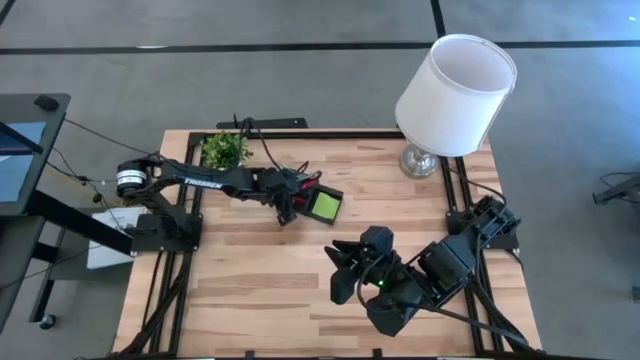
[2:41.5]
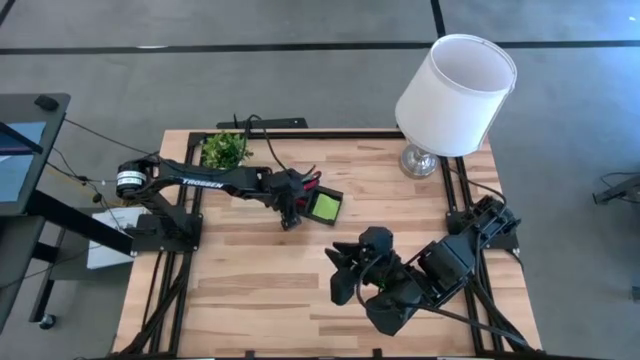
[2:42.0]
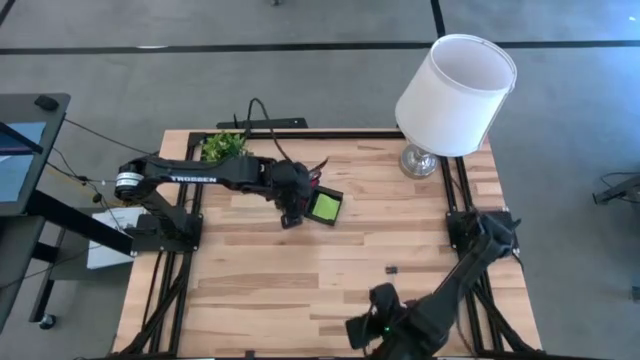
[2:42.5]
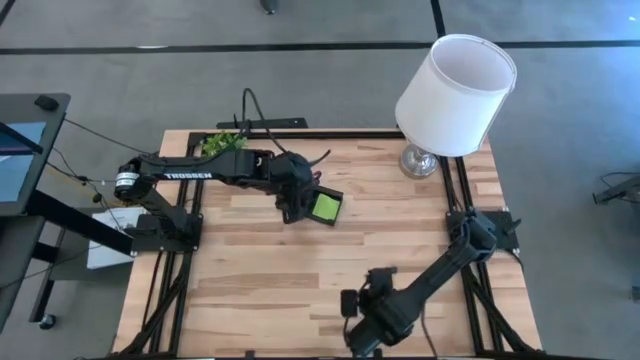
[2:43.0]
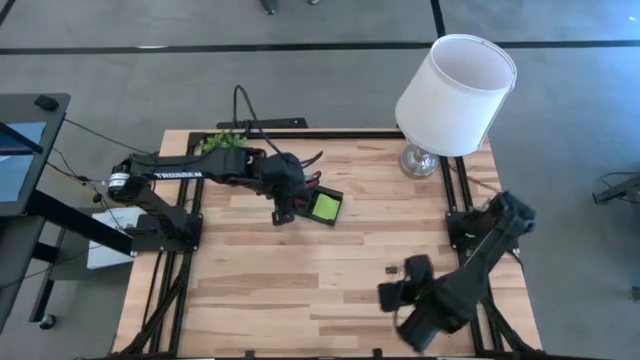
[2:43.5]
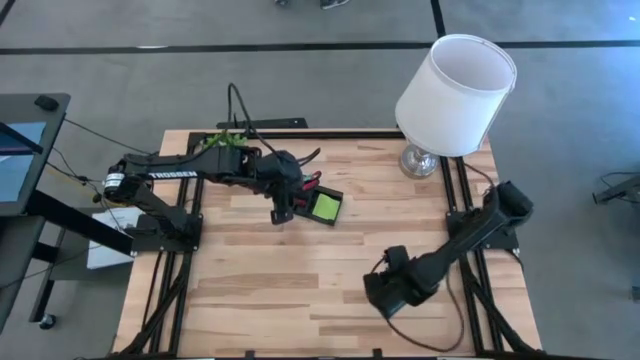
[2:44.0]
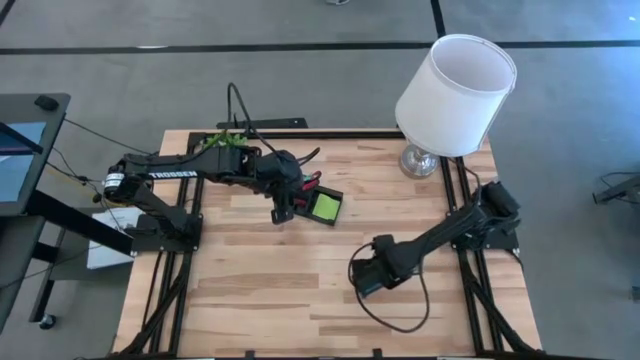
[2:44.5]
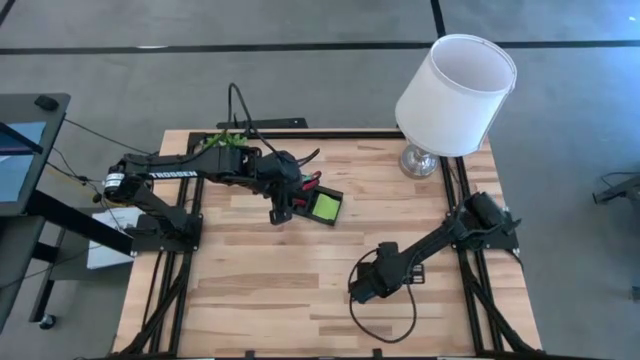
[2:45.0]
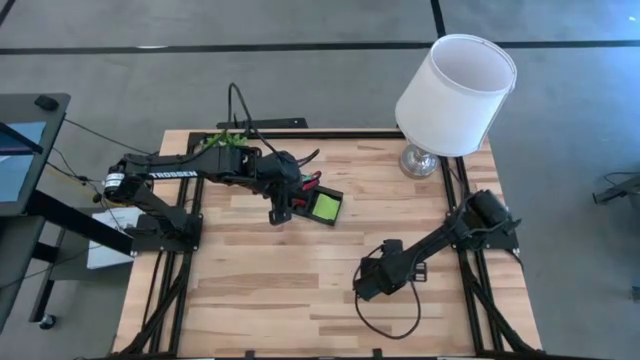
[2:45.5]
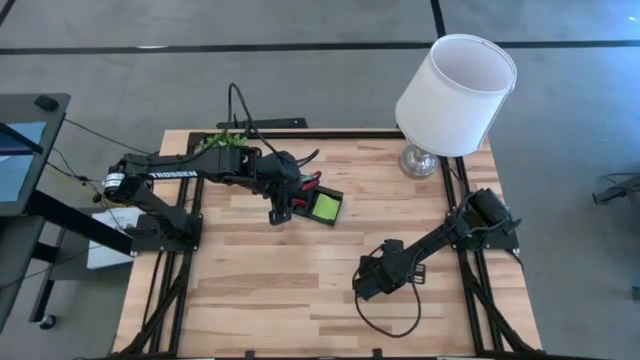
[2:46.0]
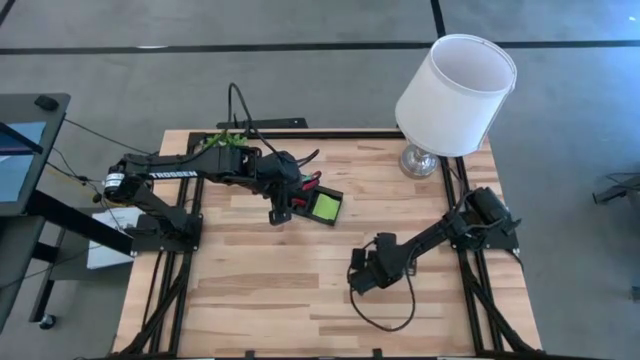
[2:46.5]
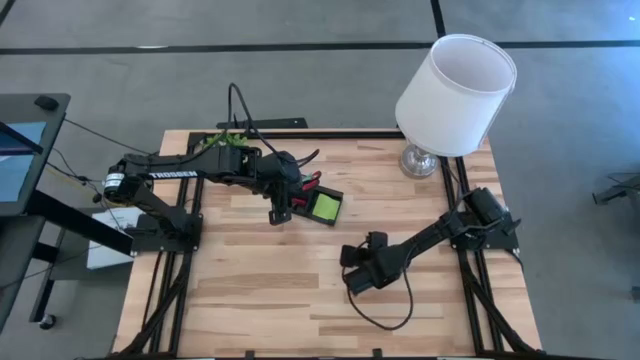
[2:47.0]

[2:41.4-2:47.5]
Task: Pick and place office supplies into organizer
Put the black binder clip into the black desk organizer

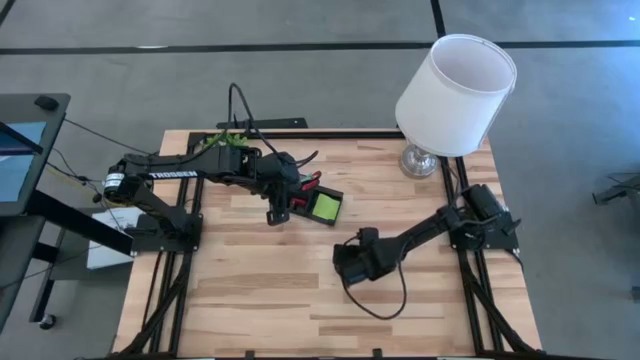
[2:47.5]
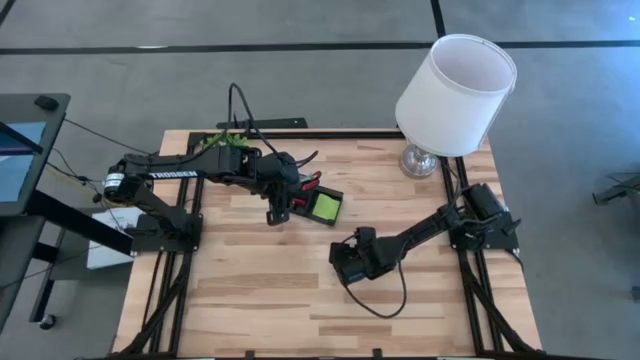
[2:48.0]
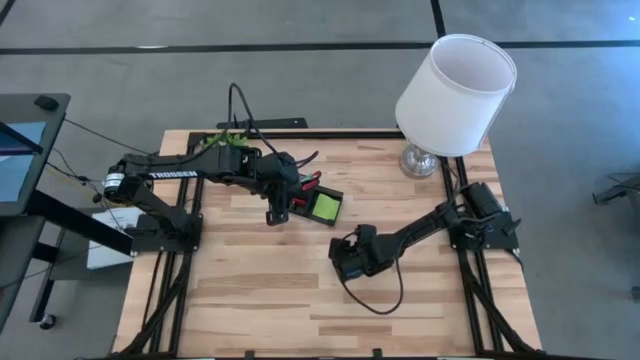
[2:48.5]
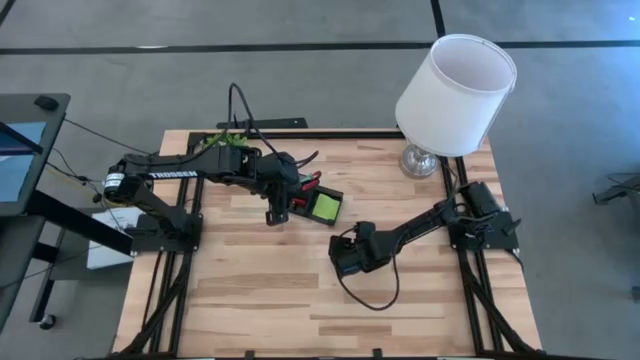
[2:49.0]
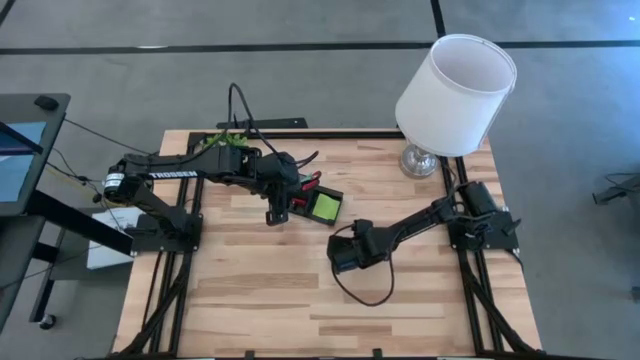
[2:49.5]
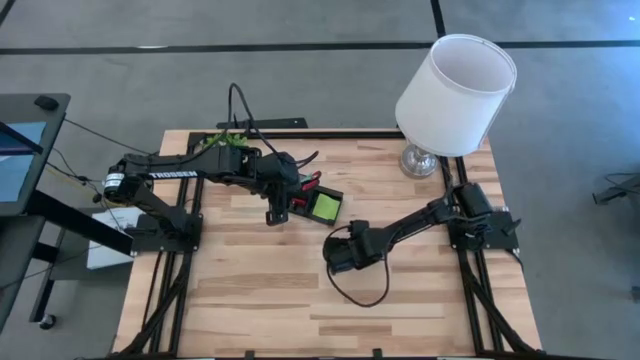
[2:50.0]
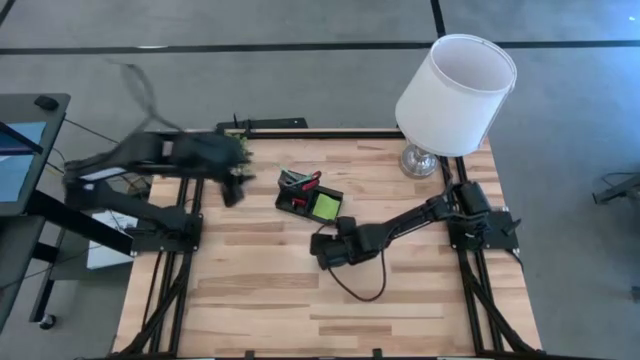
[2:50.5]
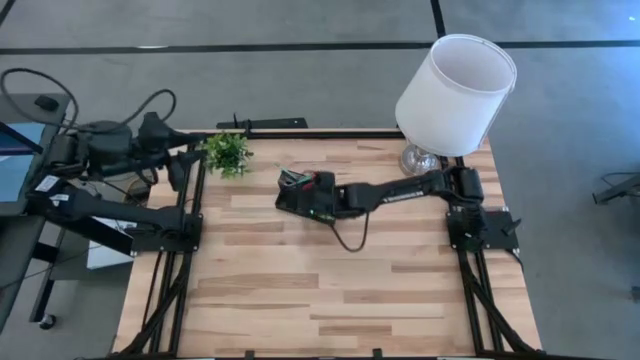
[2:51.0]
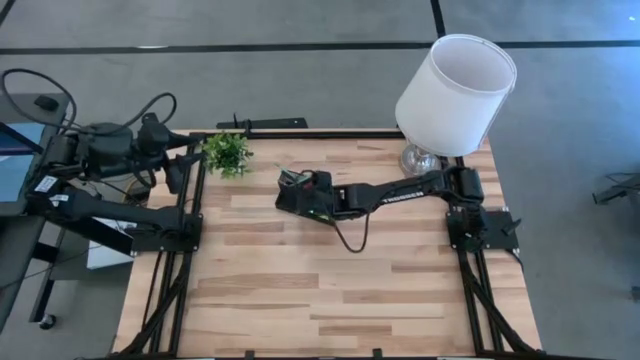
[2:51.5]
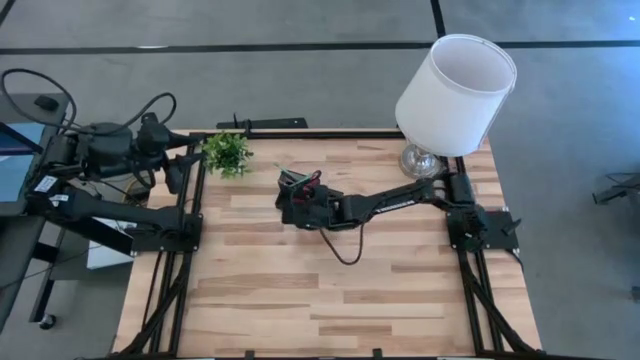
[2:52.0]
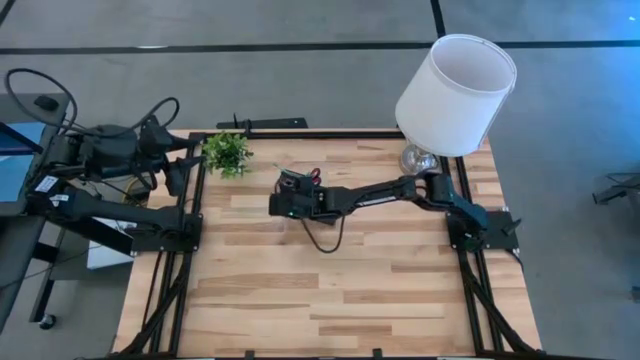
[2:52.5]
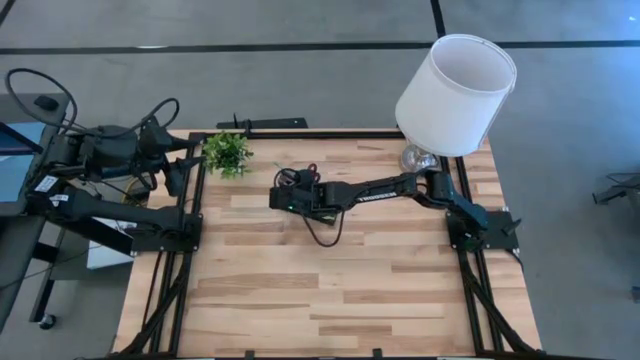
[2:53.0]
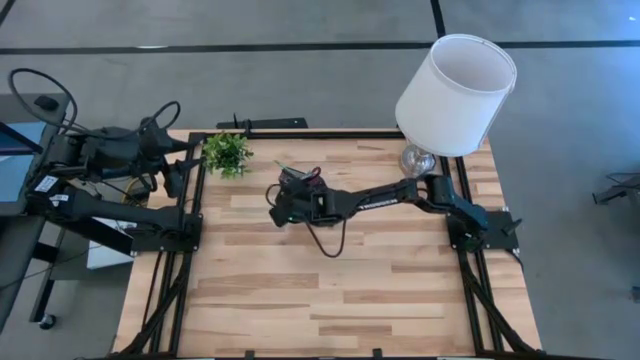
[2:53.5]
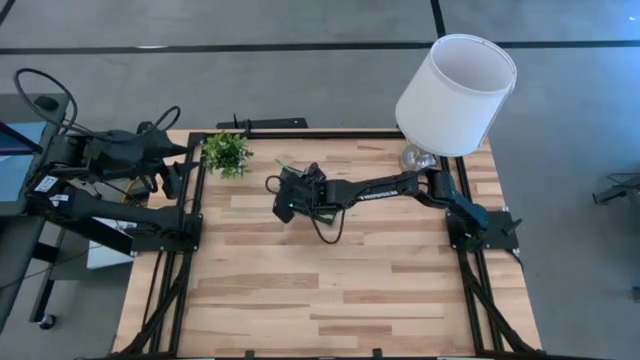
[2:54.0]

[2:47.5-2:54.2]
Put the black binder clip into the black desk organizer

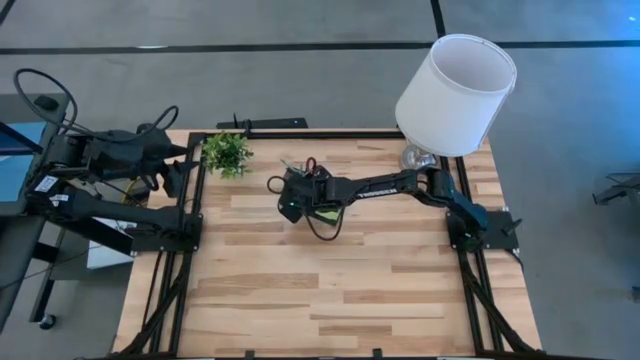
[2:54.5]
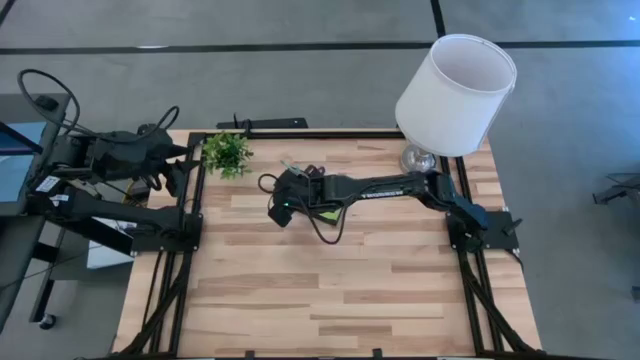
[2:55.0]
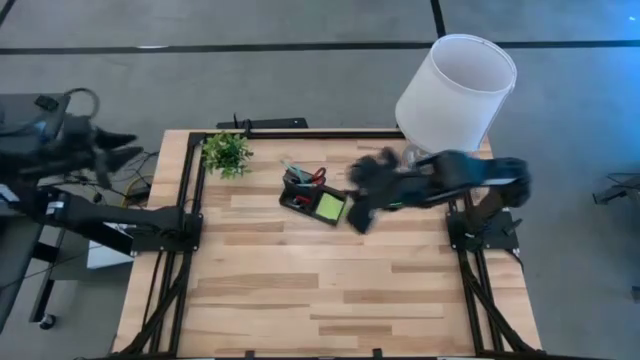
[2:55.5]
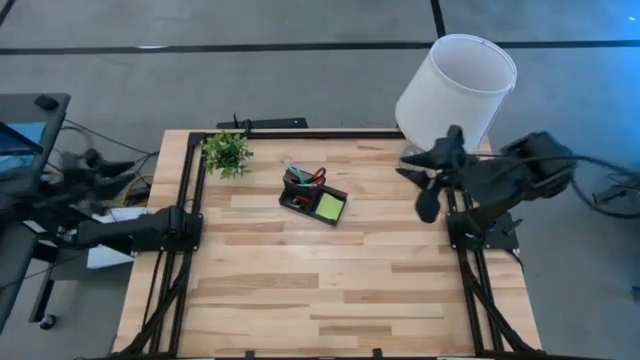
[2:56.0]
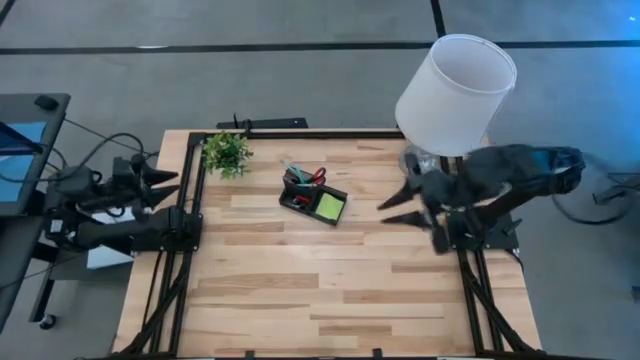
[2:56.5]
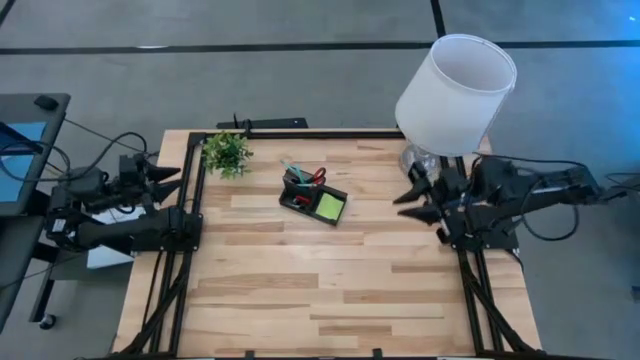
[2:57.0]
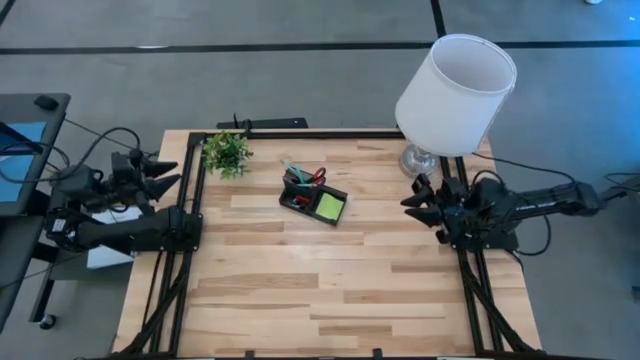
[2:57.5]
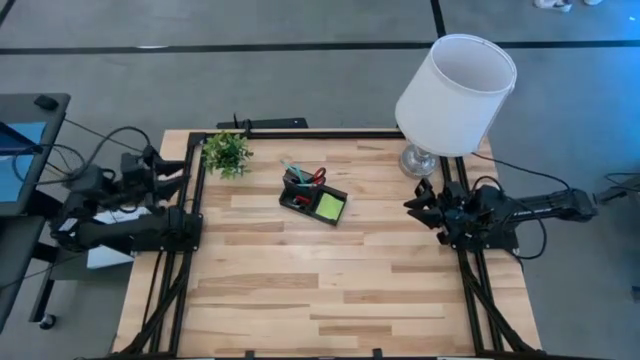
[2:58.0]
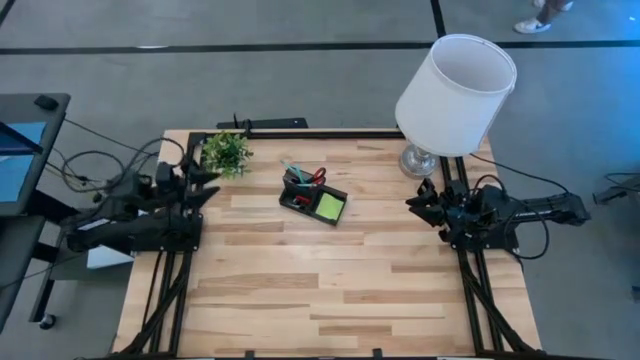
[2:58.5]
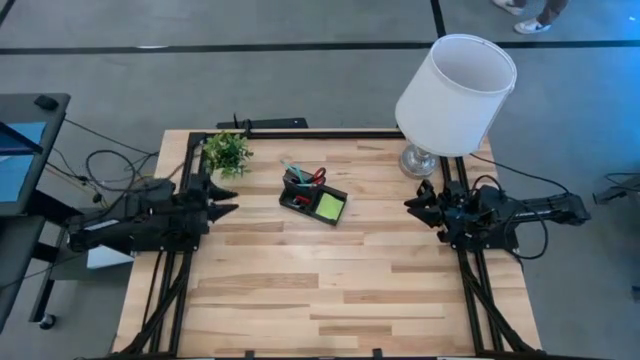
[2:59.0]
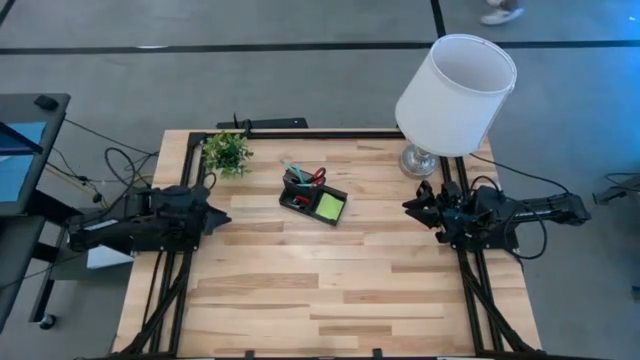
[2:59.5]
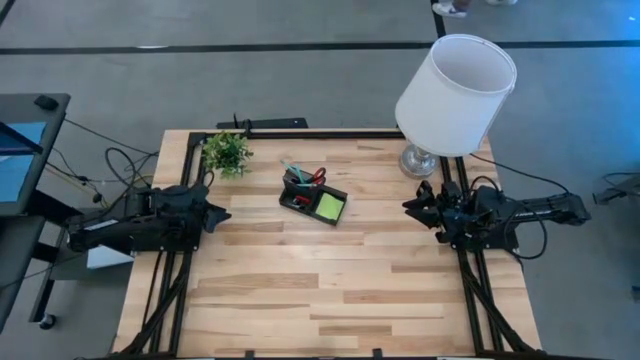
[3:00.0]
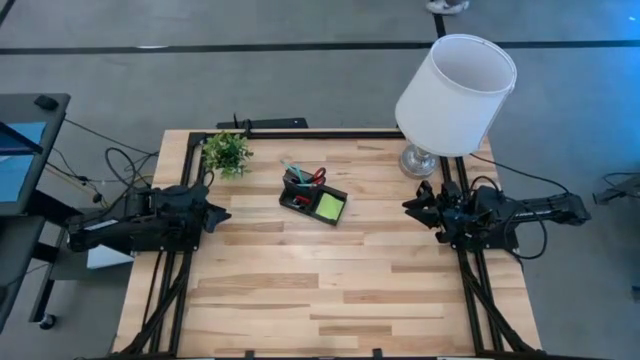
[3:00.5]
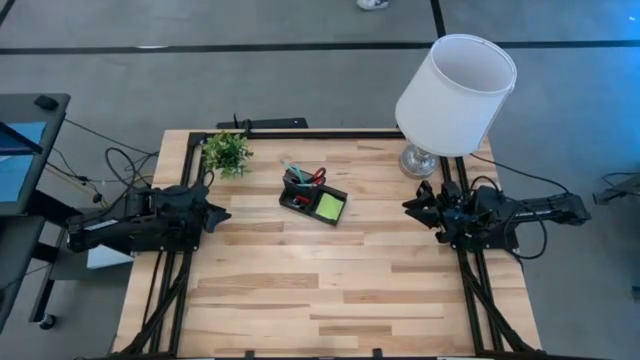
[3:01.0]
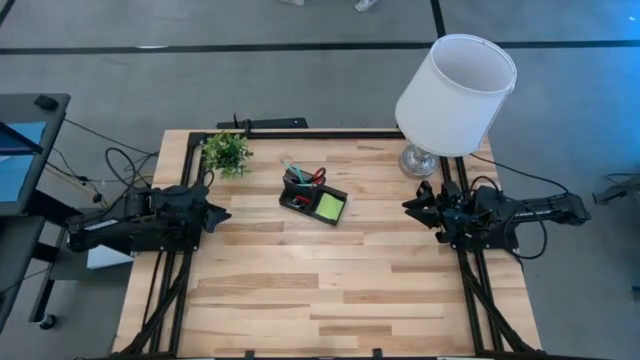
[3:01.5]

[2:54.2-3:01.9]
Return to Home Position

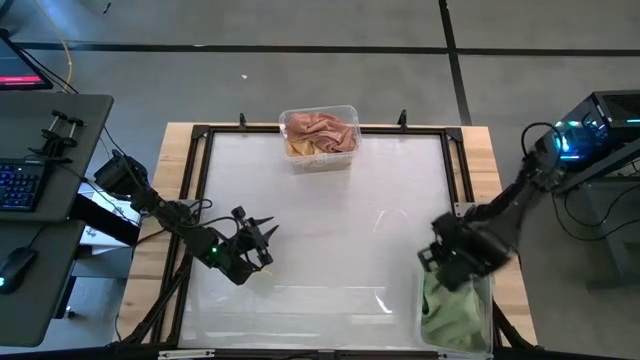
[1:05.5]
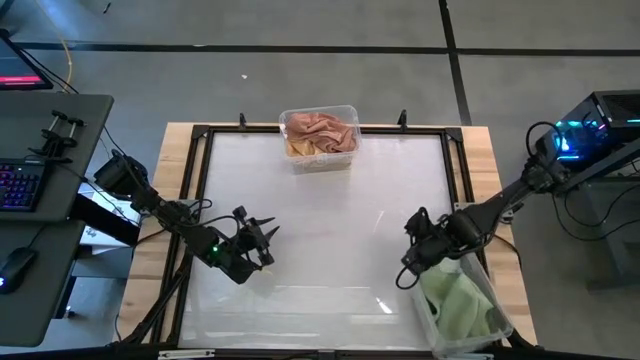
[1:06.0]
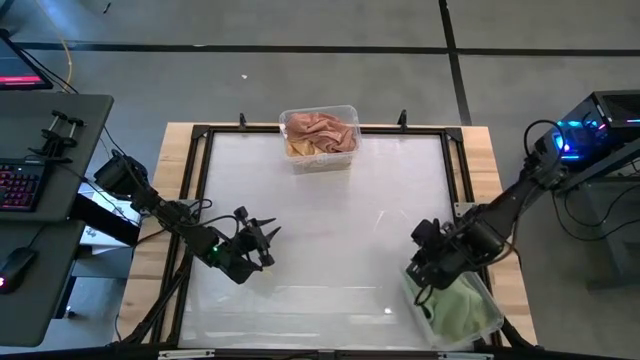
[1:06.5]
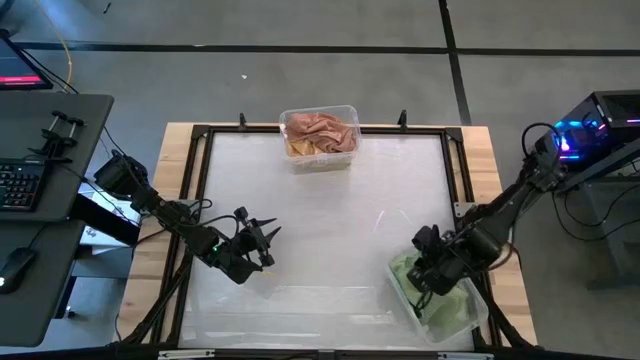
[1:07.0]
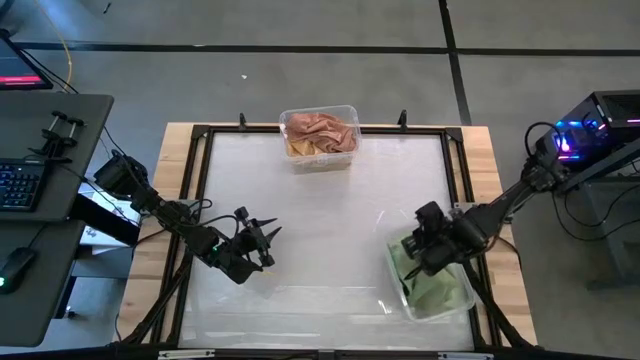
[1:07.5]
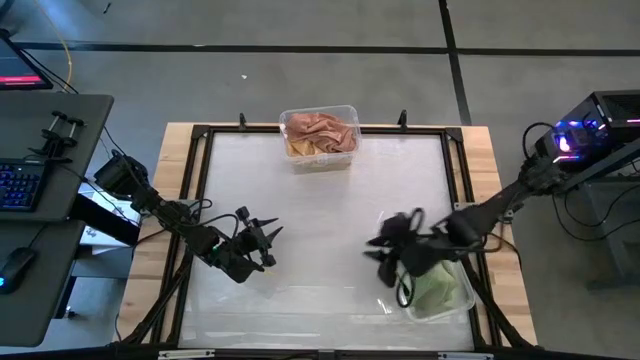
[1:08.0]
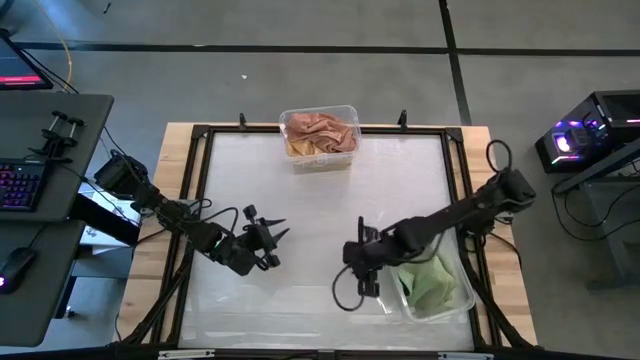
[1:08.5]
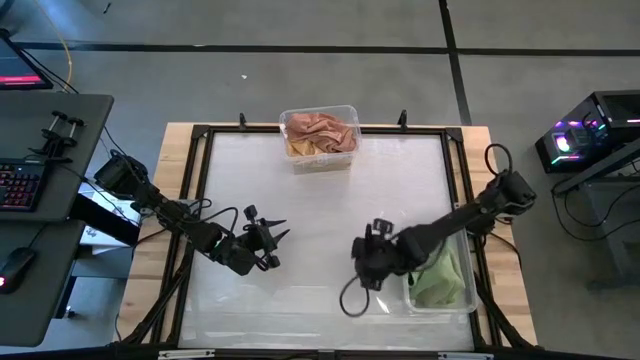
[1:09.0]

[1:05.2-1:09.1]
Task: Sort towels by color in basket
Adjust the bottom transparent bin
